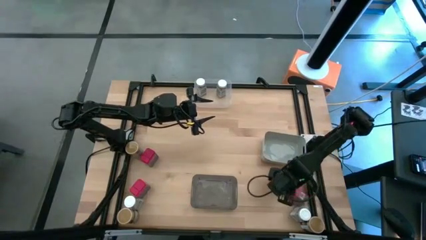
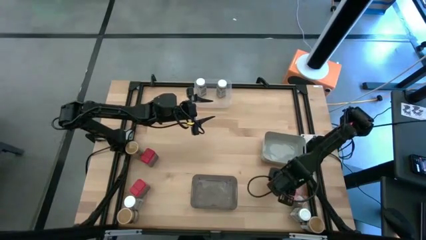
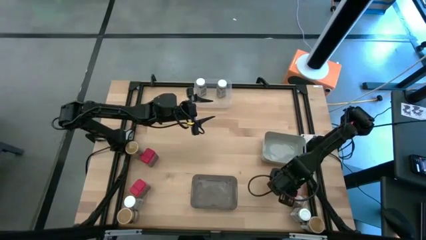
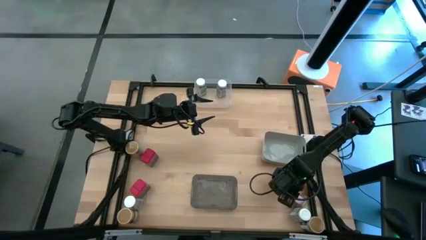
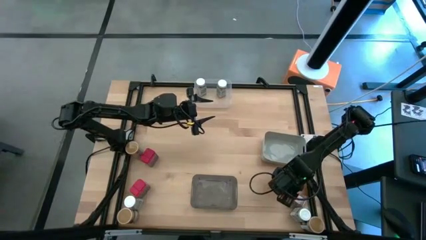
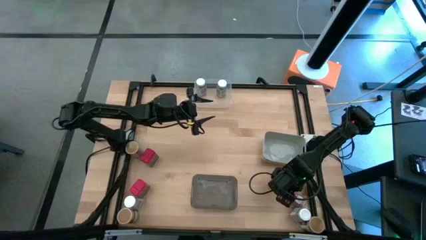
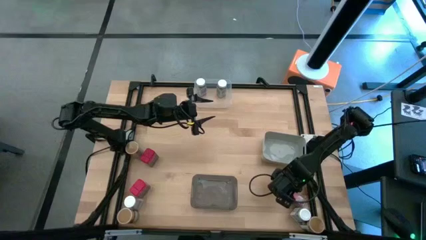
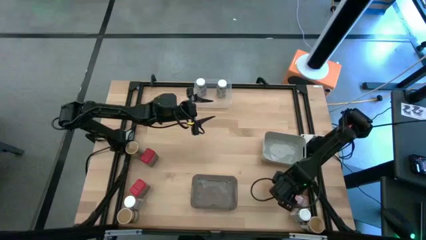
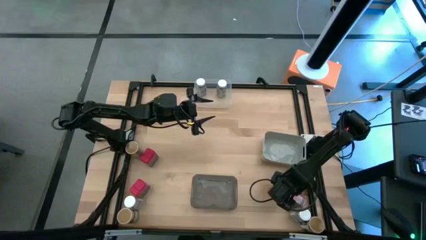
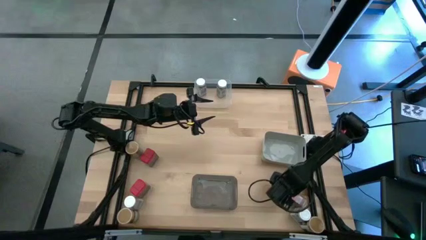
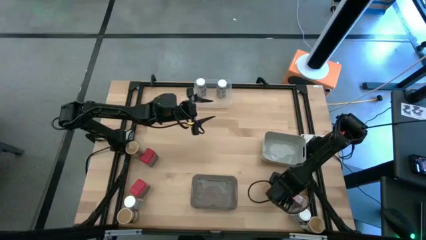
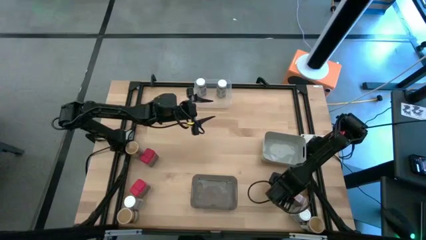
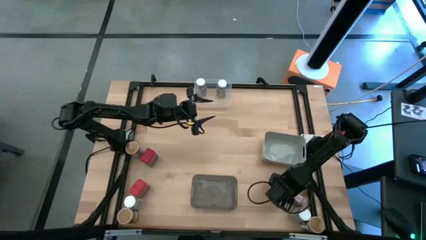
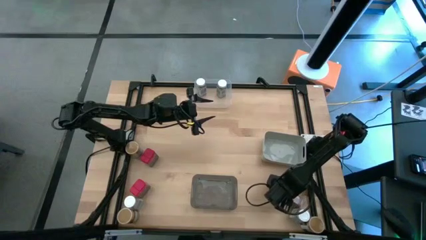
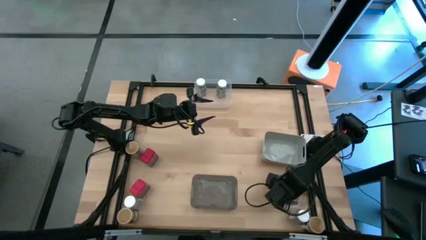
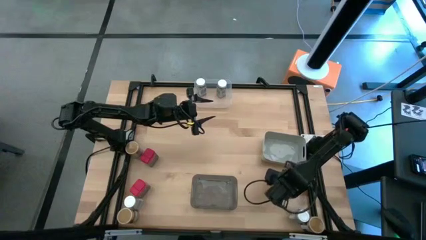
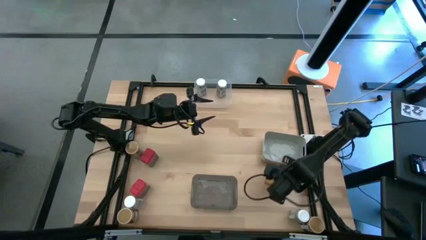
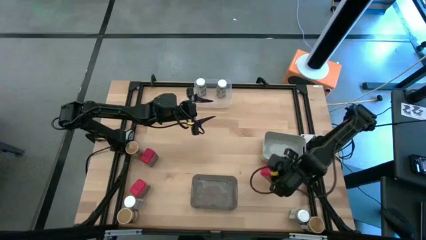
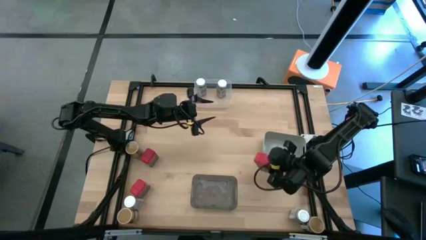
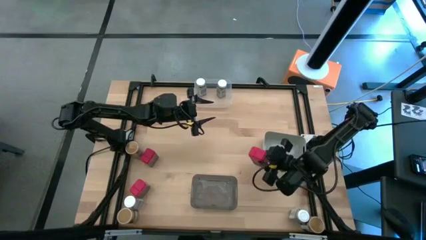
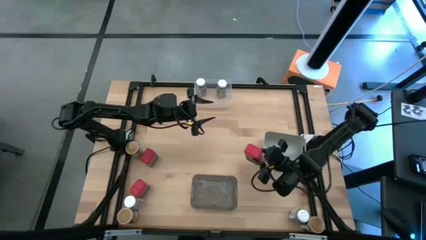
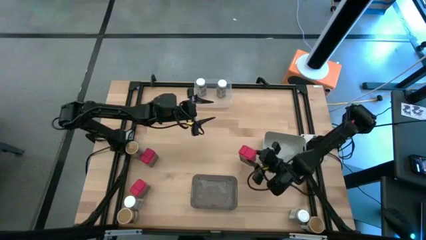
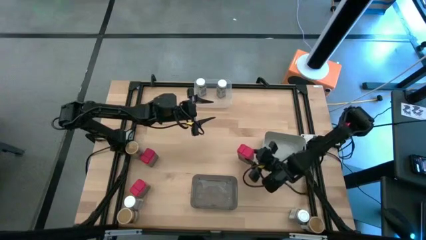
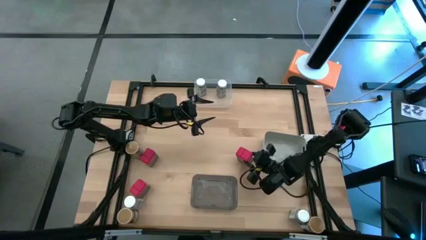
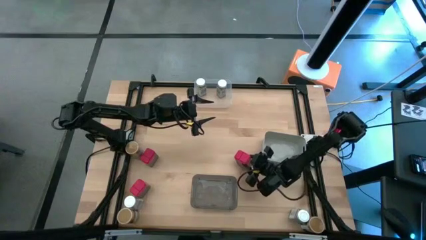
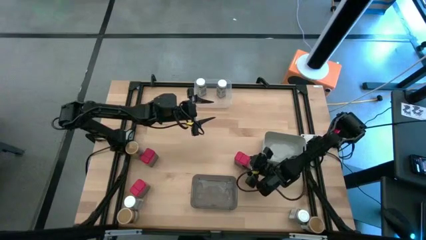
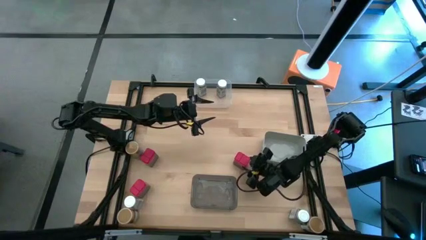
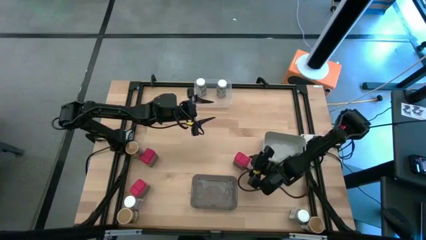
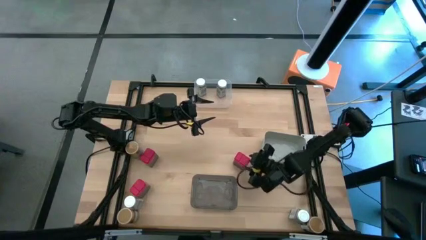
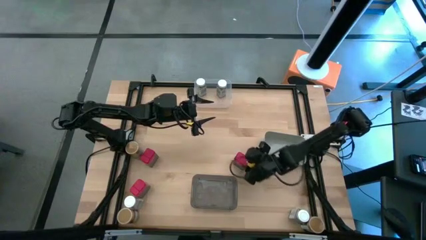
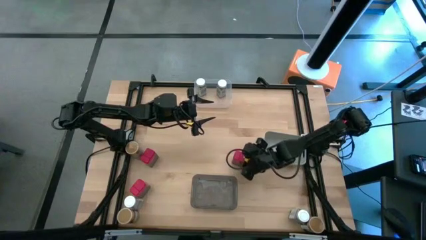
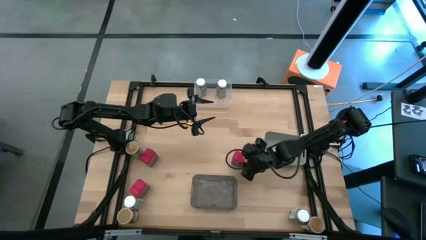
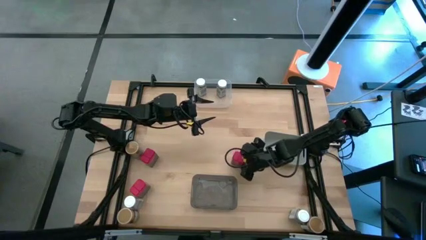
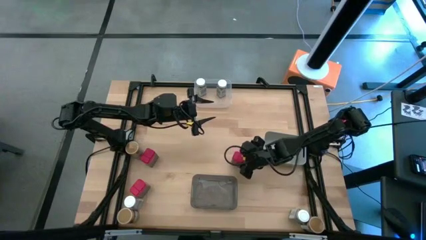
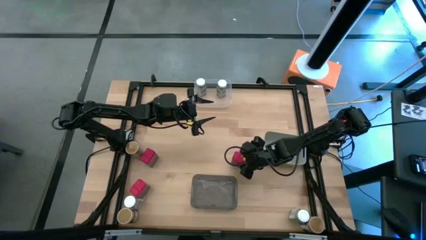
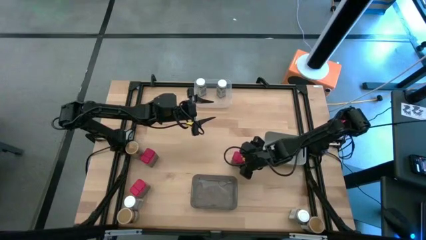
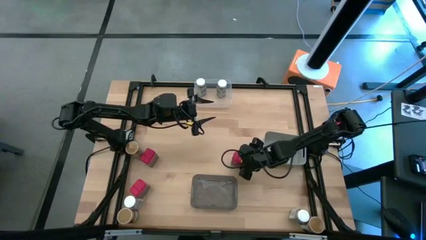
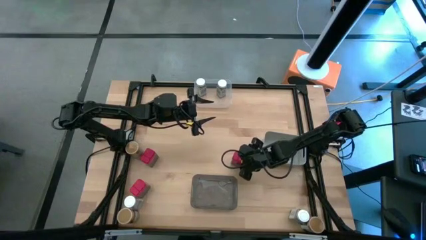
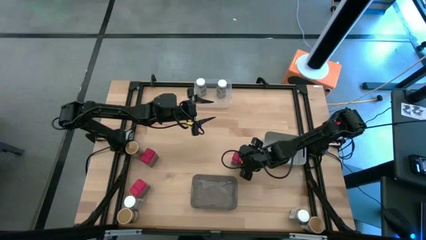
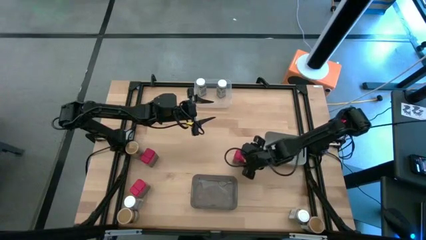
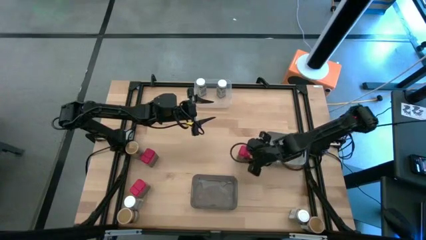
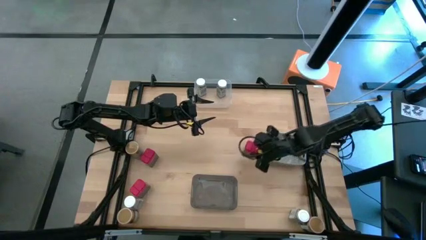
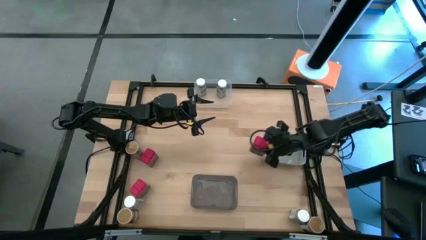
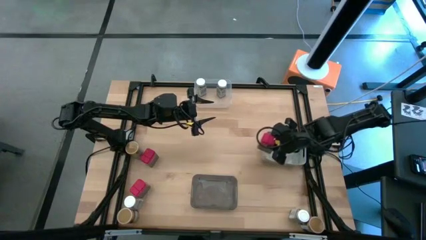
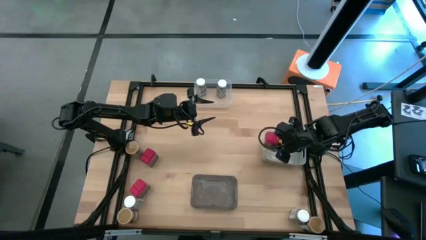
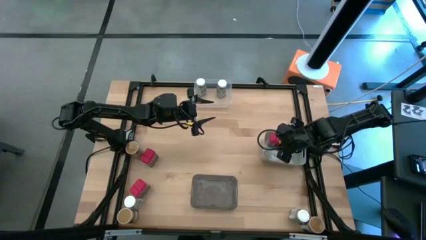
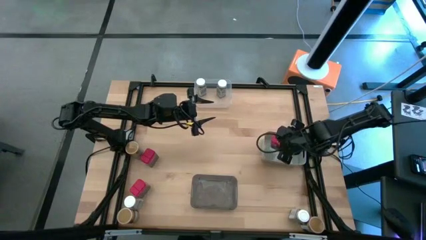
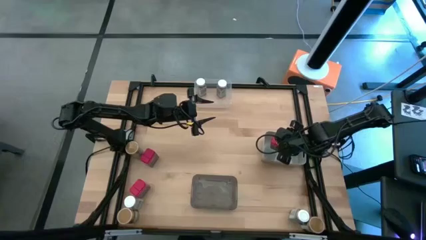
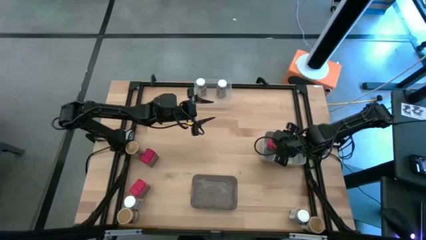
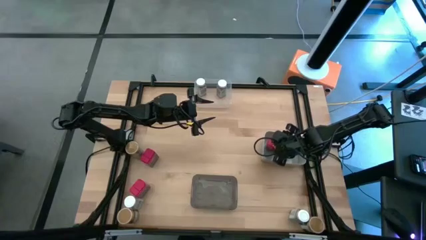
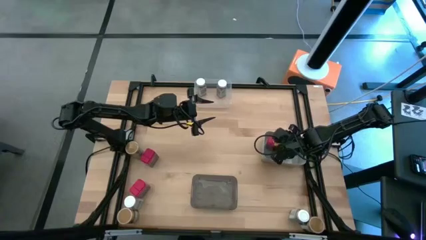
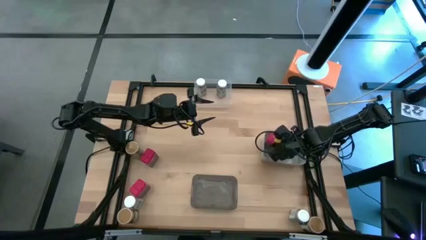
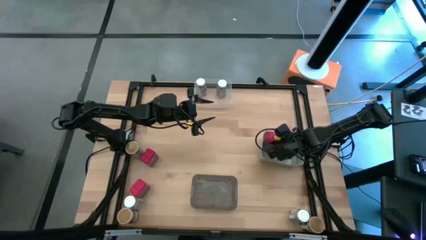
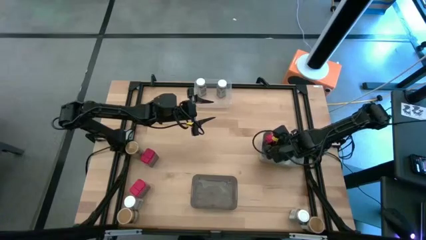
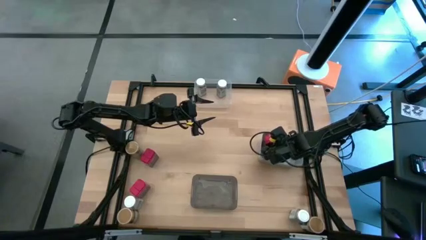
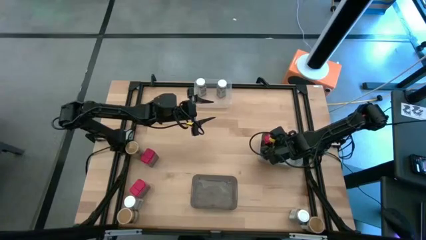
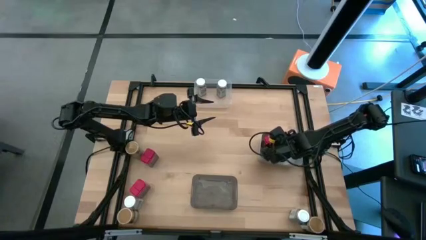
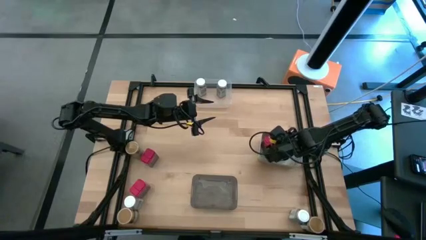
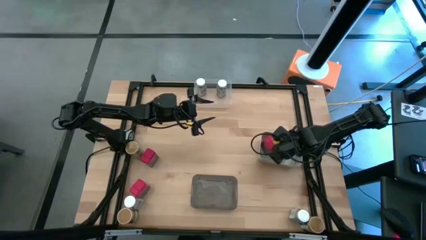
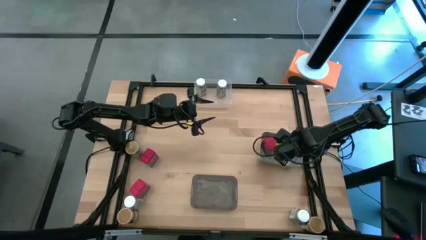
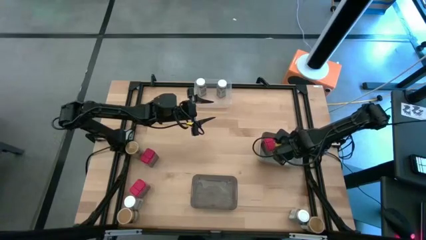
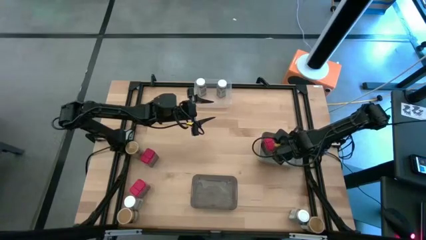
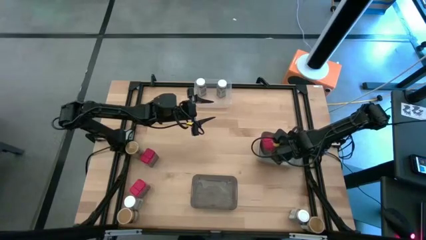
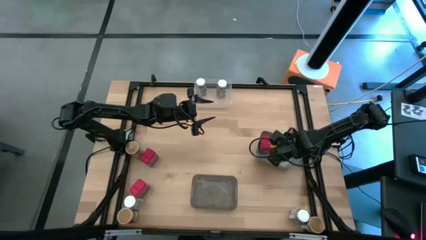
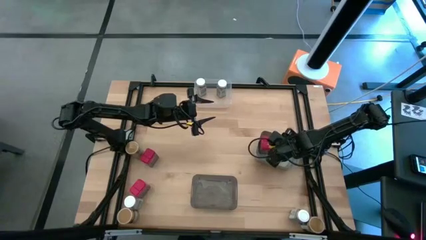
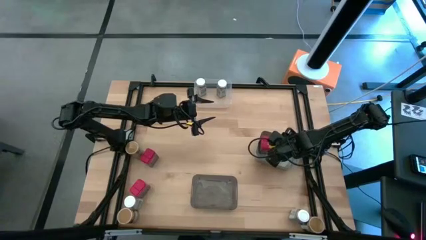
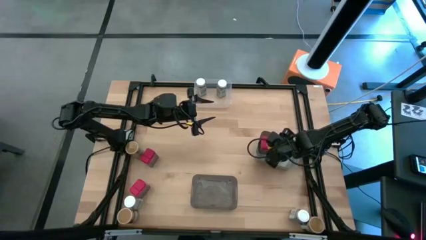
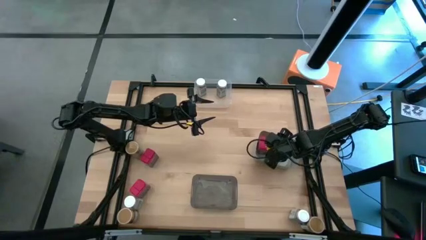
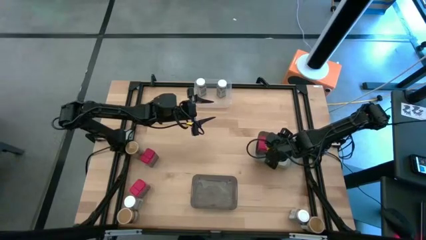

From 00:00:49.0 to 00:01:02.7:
Task: Sort spices by type
Put the red seasoning can into the gray bin
